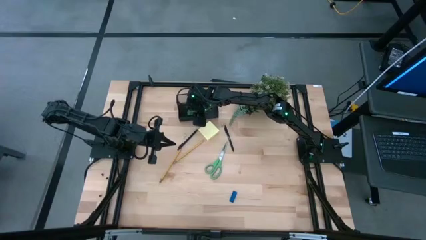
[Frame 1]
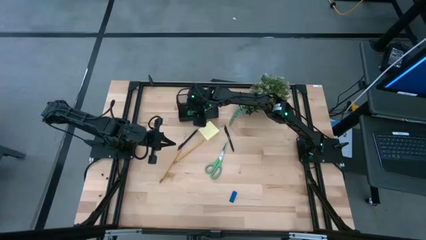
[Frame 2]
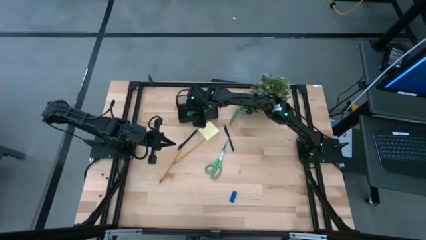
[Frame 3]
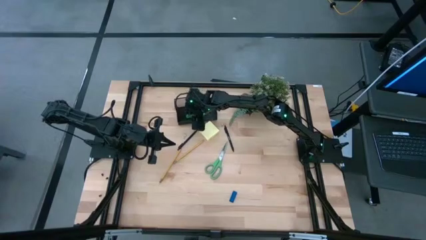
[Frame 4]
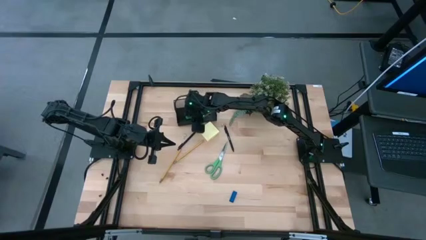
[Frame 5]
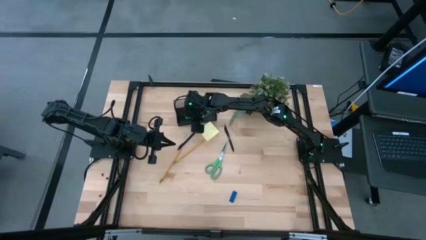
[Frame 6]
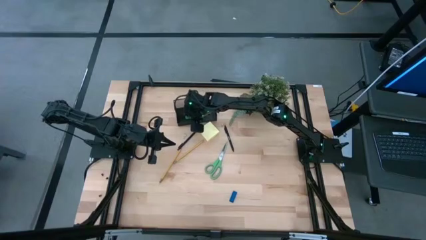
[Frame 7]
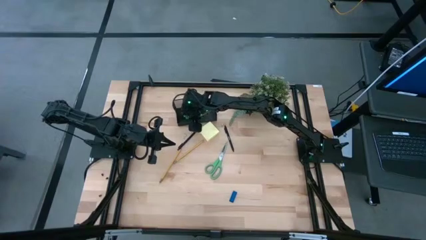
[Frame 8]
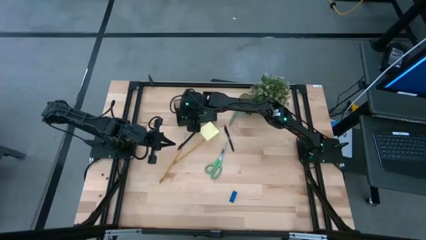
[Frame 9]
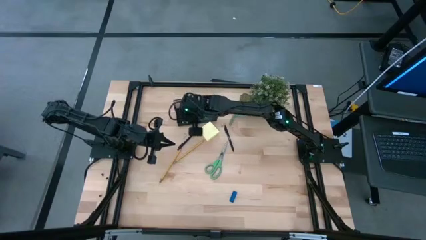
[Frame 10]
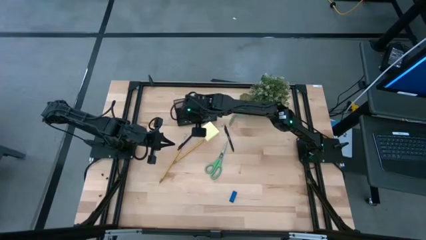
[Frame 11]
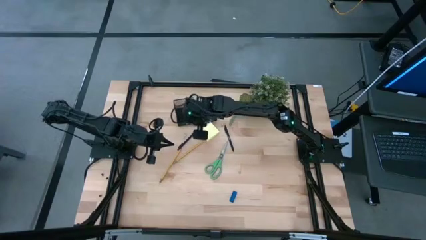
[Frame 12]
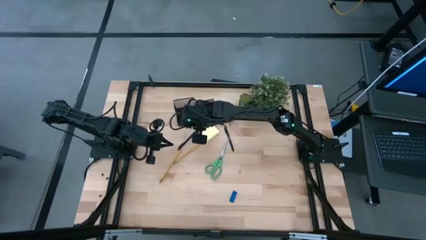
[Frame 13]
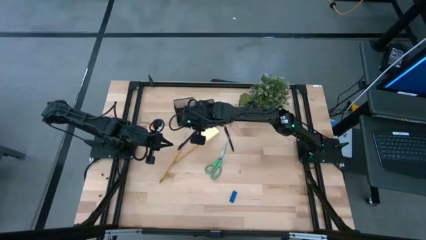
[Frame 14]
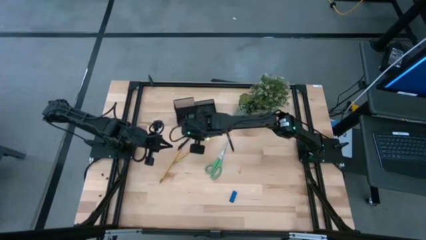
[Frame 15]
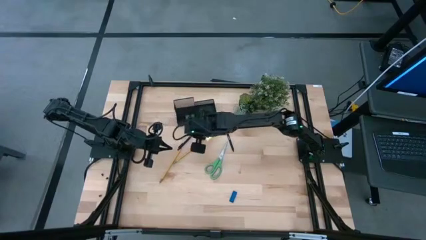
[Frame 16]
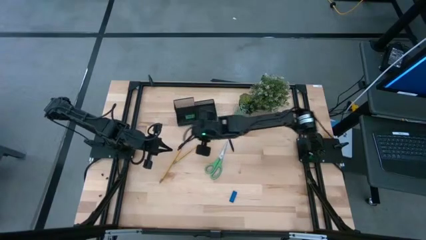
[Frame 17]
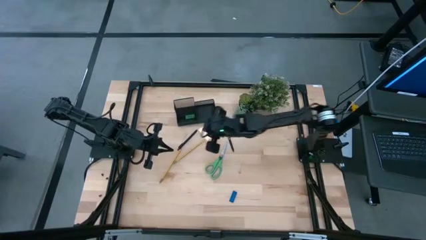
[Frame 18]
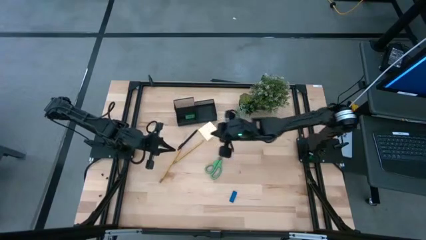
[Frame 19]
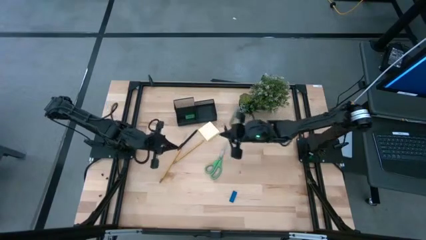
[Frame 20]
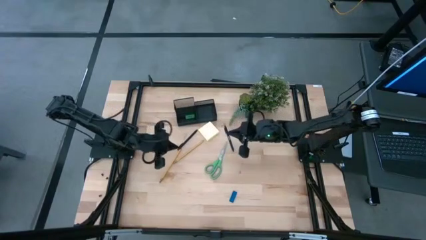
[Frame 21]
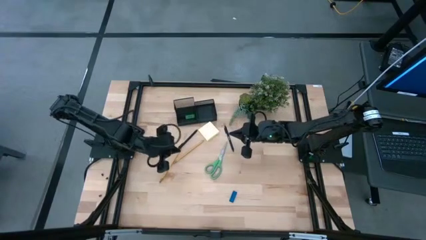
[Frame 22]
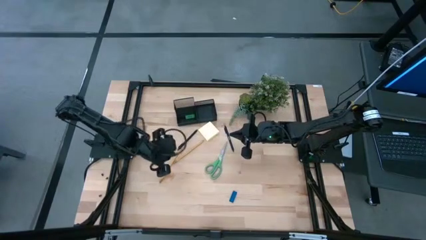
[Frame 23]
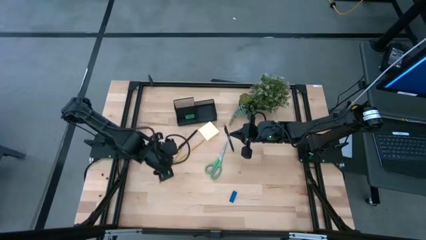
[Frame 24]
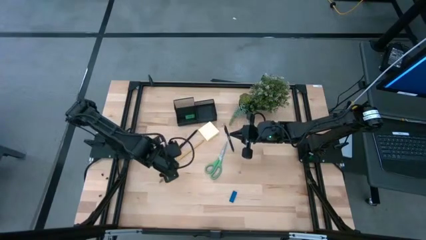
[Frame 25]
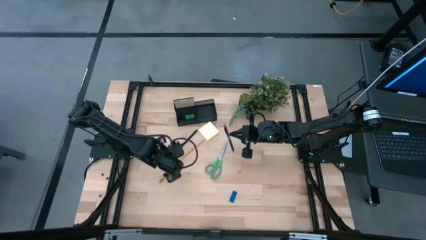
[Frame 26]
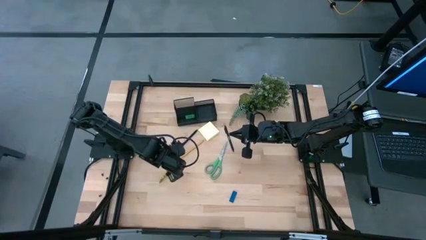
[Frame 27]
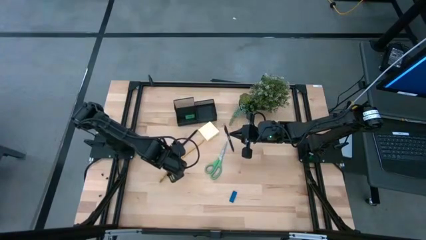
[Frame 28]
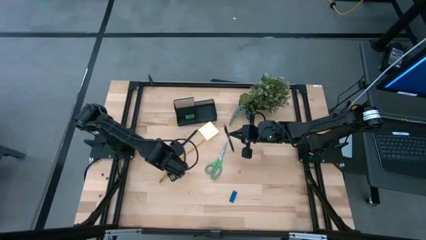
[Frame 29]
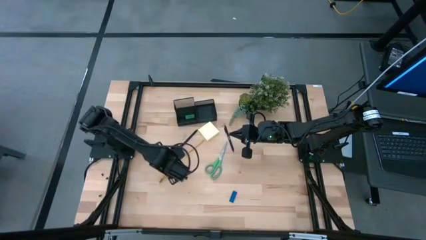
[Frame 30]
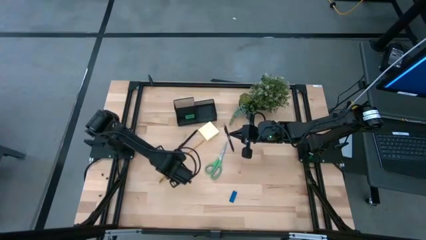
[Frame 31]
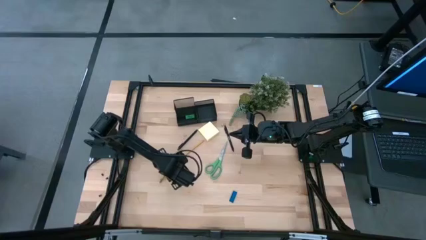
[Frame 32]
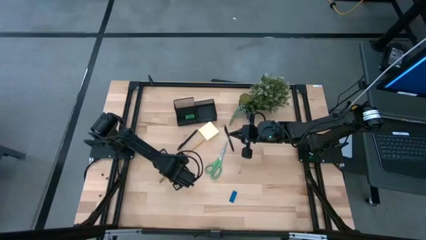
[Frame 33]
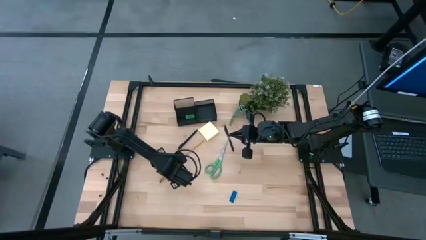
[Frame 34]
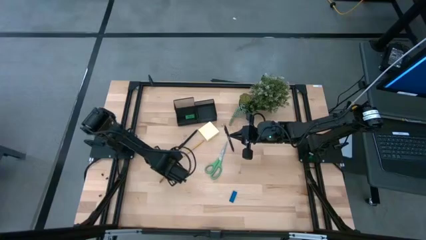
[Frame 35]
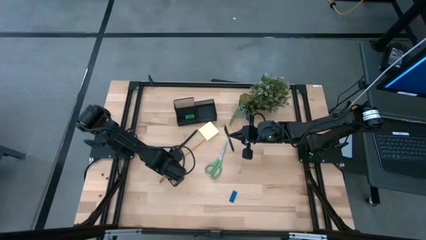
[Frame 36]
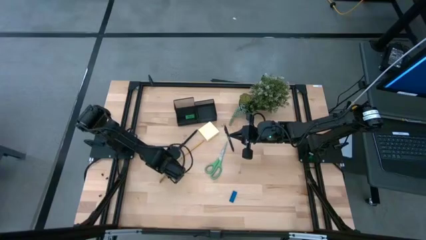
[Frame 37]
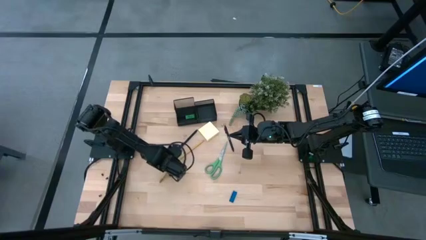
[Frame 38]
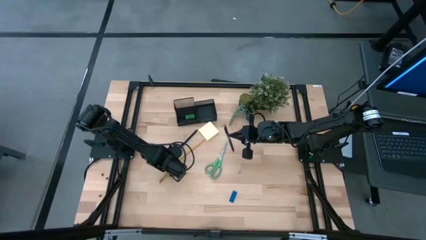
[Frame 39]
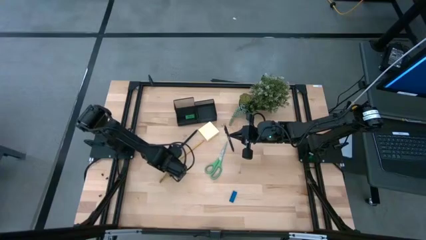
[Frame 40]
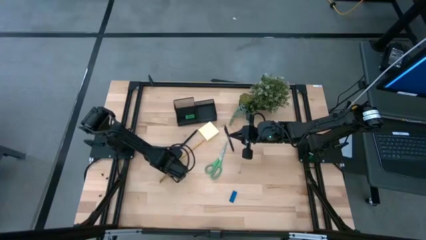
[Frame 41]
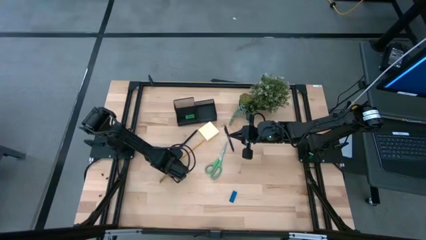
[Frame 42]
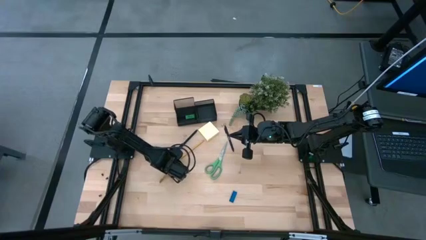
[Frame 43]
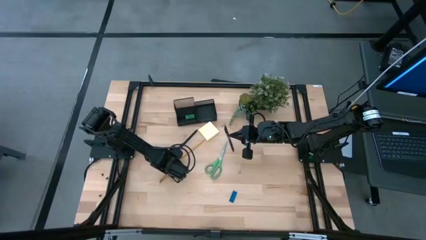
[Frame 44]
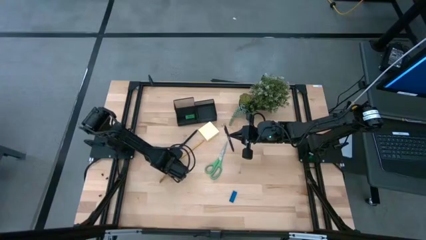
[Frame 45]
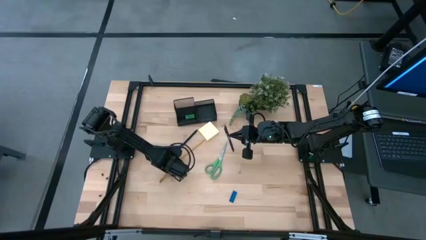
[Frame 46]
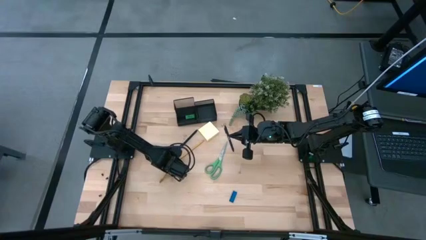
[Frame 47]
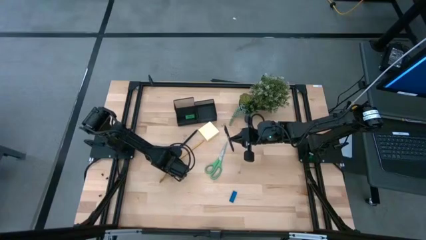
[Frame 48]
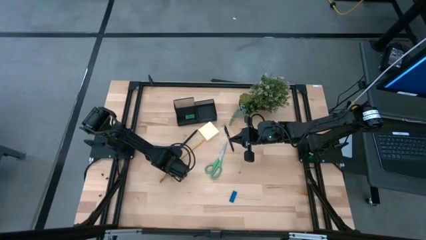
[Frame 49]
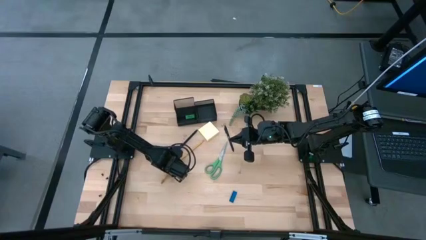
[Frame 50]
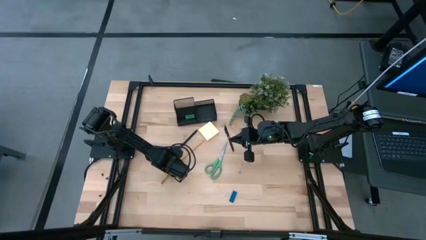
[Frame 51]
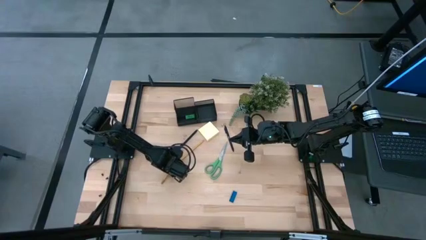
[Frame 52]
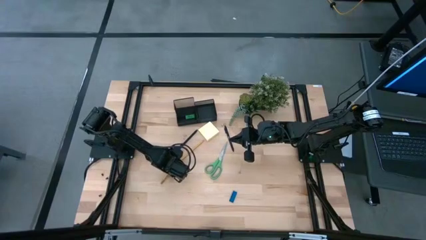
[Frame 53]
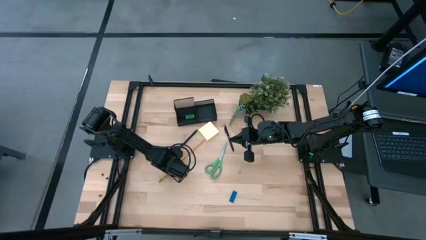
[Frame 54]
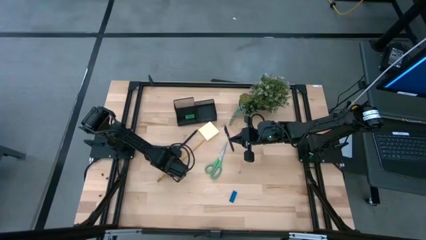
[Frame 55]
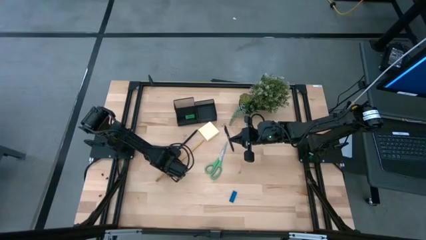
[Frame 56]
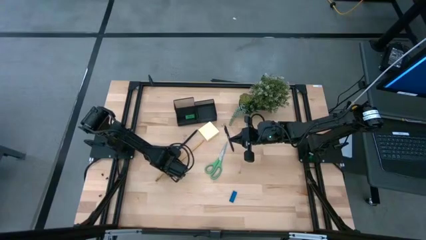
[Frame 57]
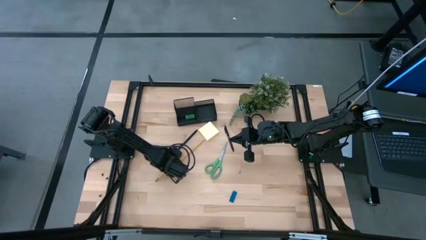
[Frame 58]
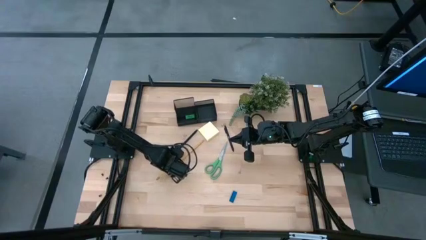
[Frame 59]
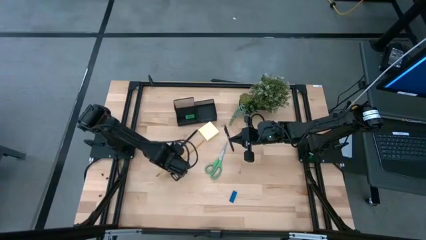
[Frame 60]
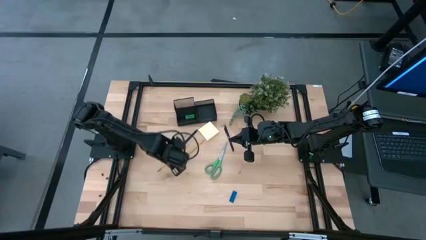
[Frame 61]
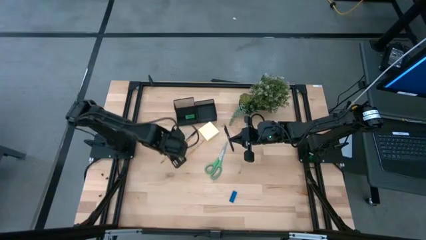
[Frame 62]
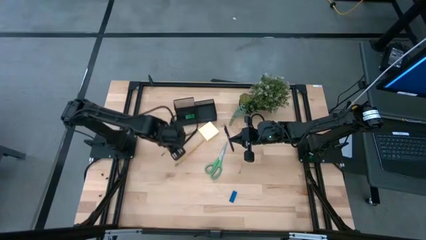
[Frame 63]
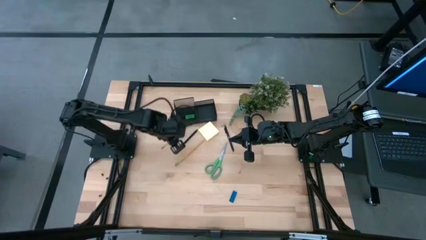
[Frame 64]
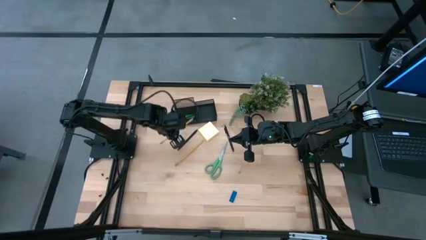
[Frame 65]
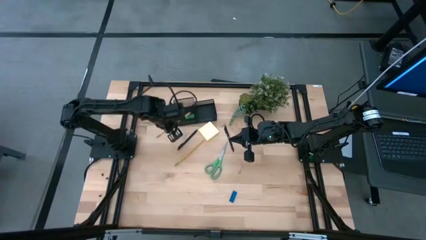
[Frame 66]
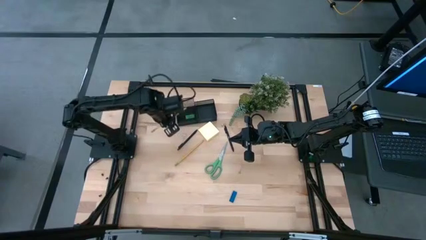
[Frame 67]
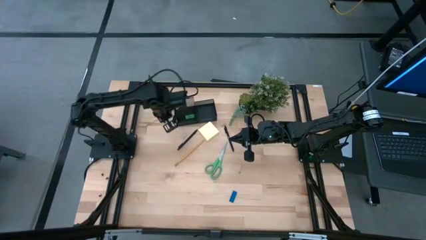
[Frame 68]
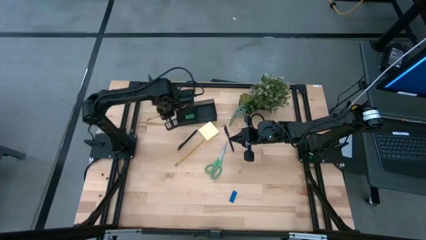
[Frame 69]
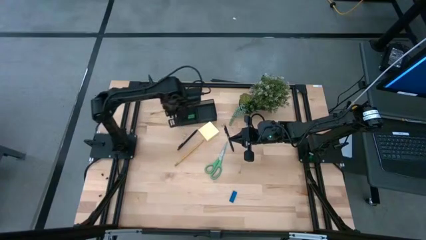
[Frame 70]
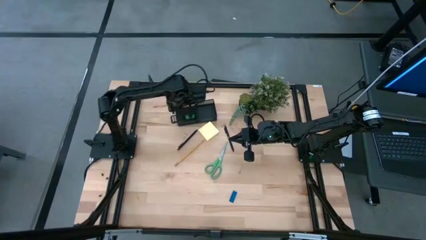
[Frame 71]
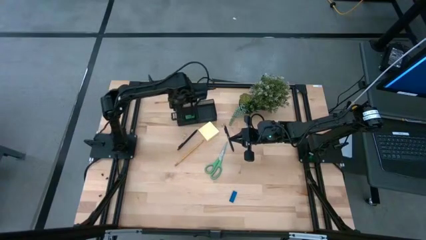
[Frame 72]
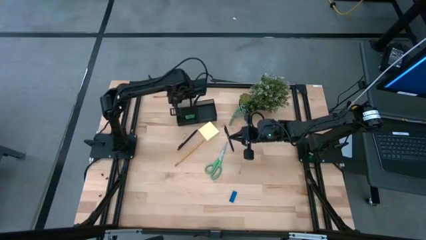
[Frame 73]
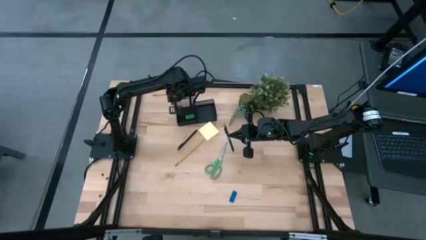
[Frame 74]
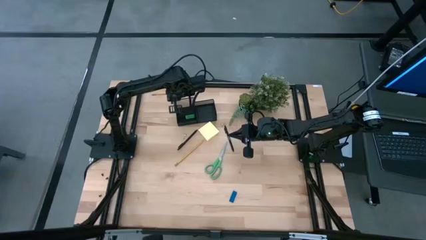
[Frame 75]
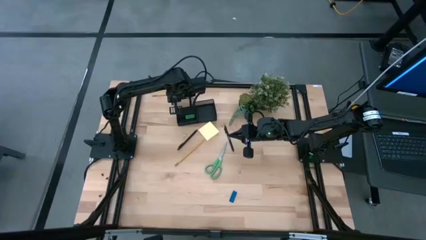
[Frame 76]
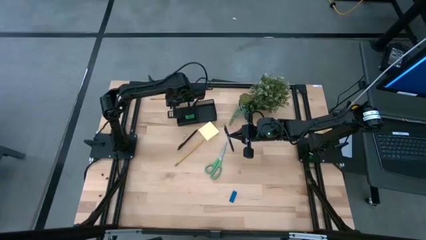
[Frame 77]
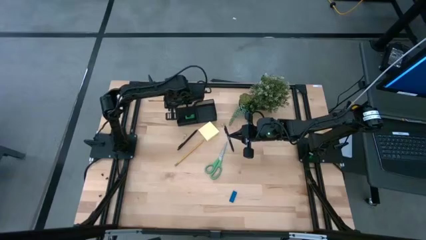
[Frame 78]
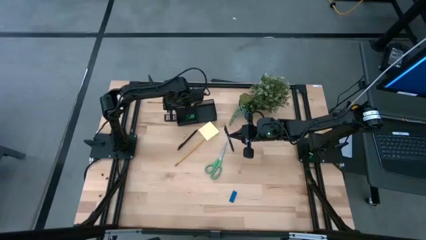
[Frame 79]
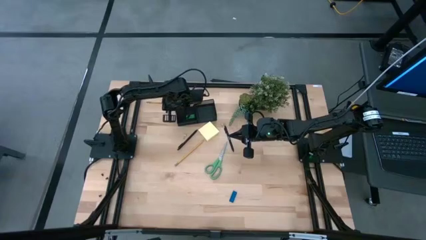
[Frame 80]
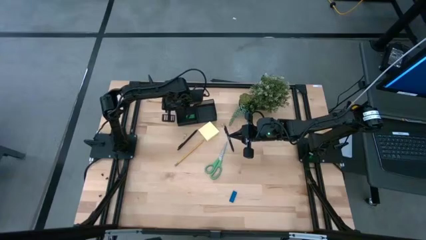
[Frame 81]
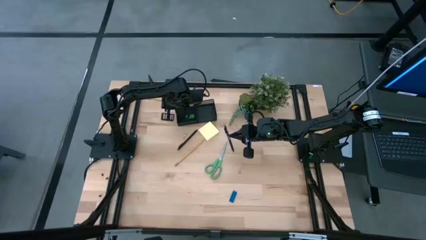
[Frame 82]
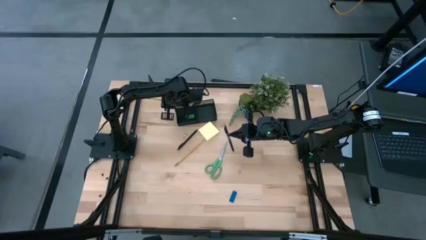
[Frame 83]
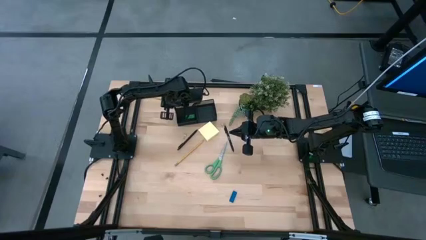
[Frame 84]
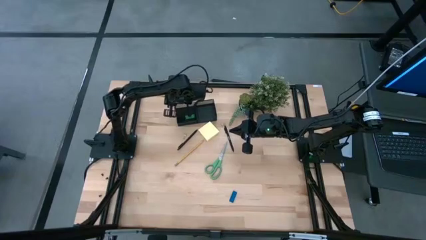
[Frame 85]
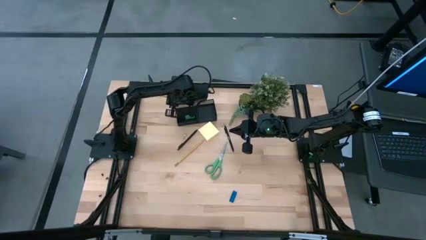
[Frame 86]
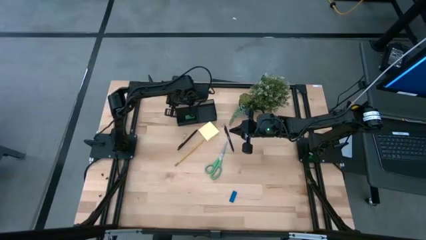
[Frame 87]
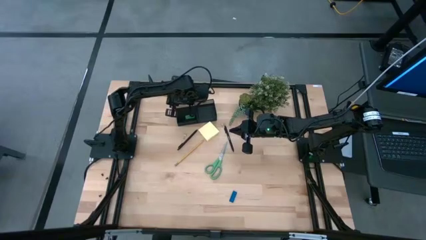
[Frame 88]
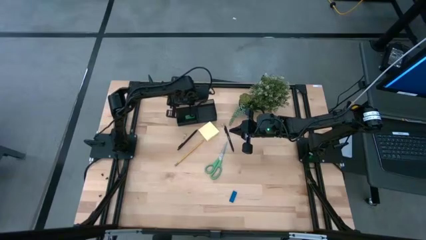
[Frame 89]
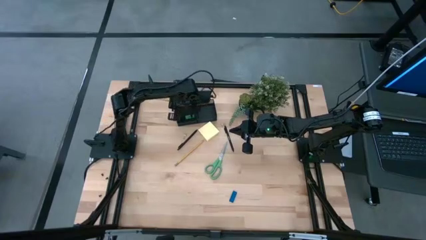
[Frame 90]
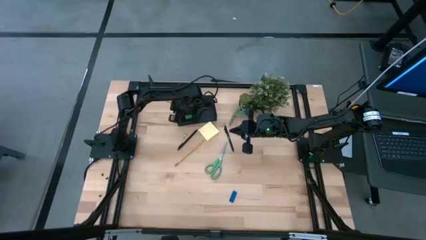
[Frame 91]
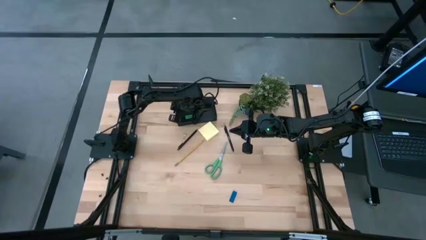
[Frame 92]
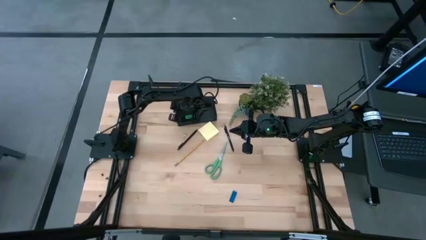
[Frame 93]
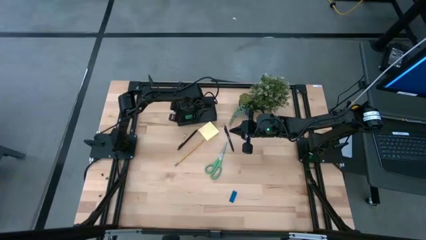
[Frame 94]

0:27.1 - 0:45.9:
Task: Pick and place office supplies into organizer
Put the bottom yellow pencil into the black desk organizer
